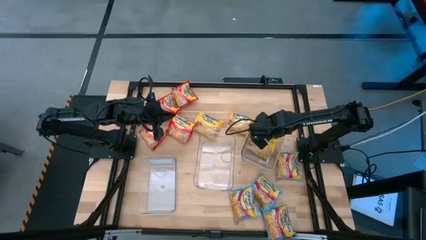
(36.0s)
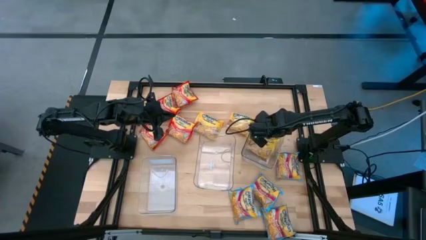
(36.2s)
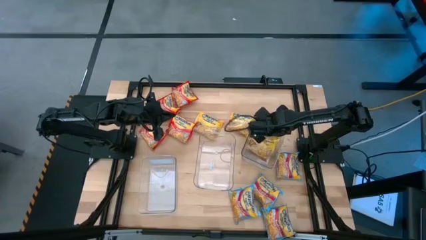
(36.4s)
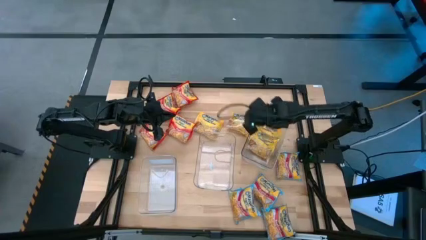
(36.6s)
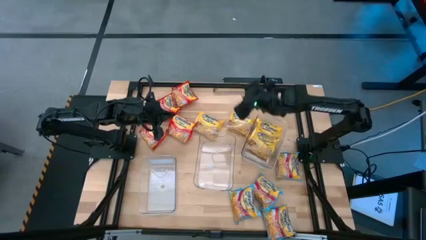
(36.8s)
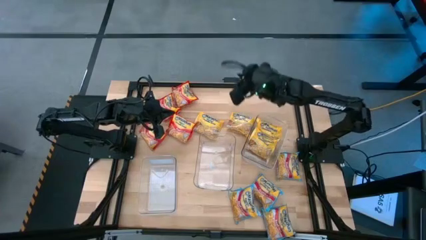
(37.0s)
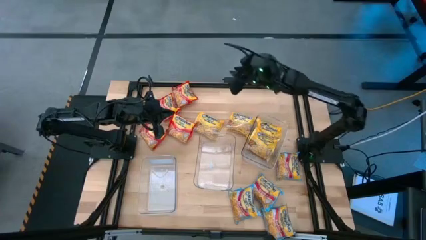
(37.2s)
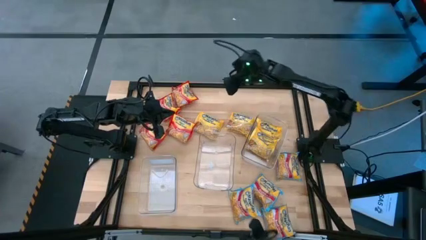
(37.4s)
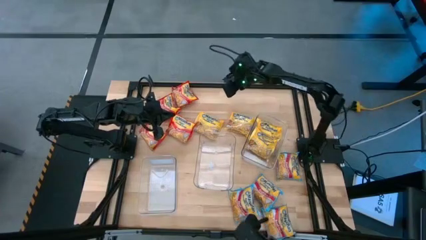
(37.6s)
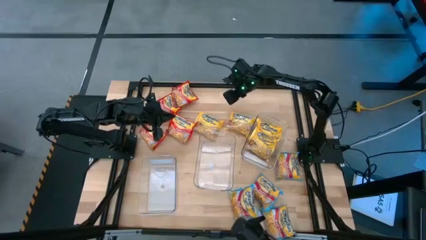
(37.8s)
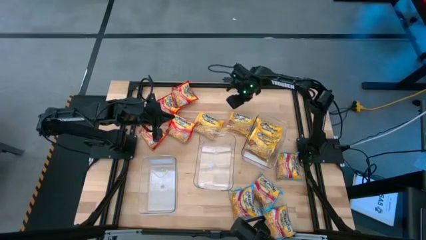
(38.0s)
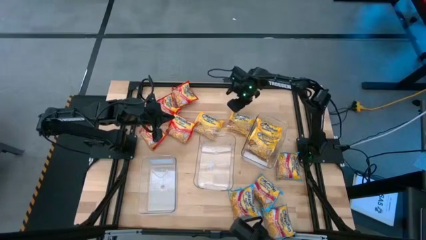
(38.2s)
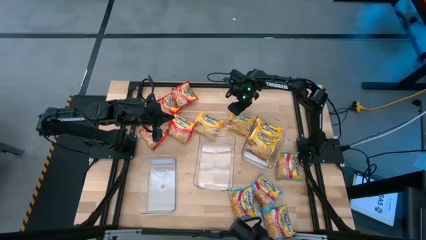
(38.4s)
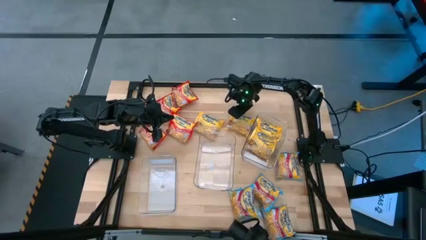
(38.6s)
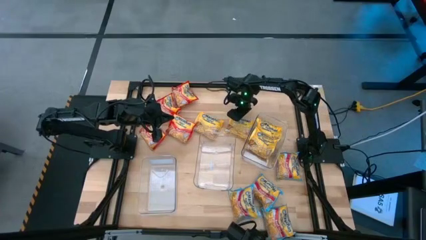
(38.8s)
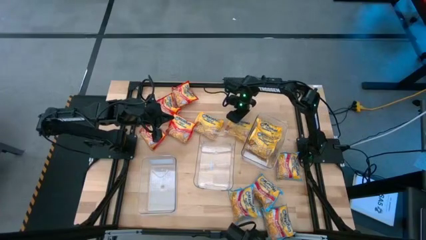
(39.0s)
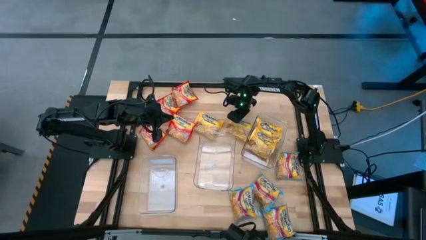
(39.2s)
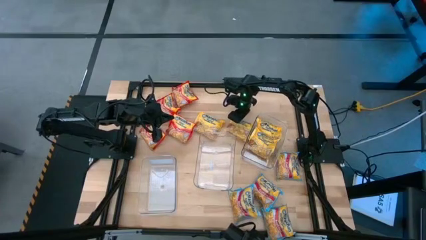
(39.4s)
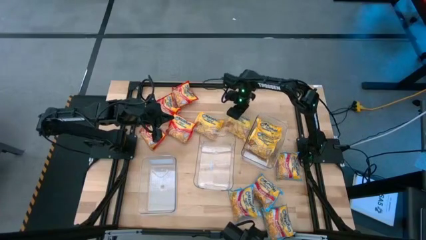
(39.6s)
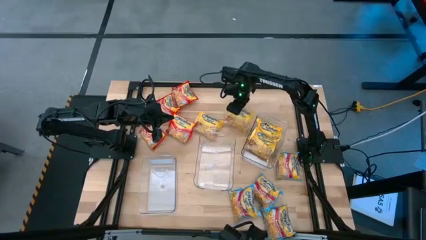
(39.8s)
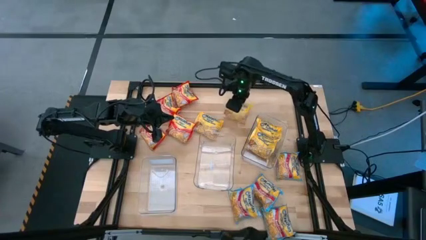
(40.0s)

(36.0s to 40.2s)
Task: Sort Maruchan noodles
Put the yellow noodle pack into the right transparent bin

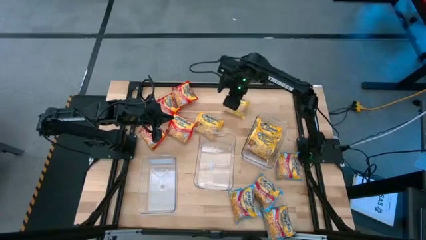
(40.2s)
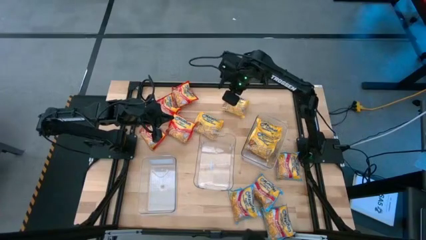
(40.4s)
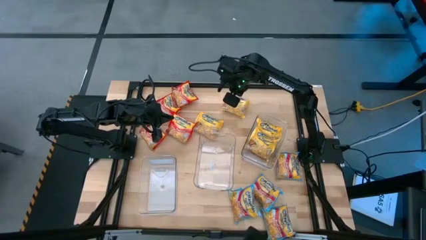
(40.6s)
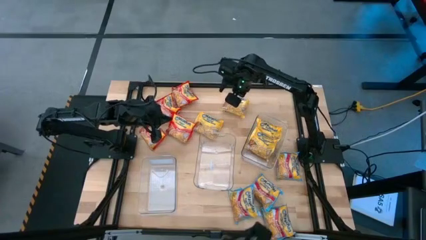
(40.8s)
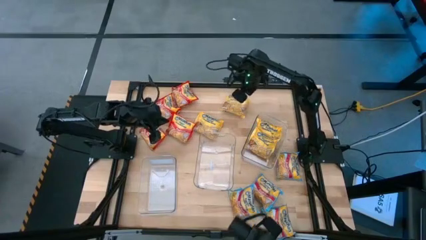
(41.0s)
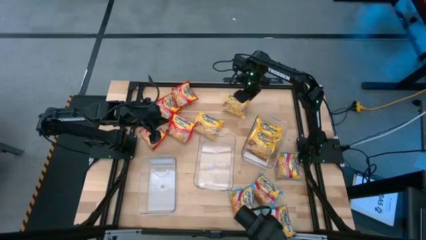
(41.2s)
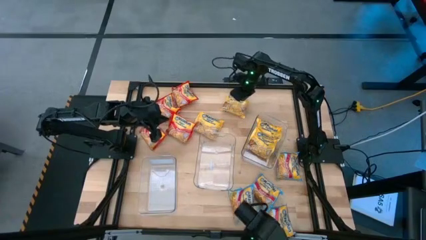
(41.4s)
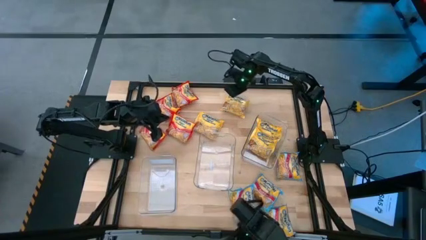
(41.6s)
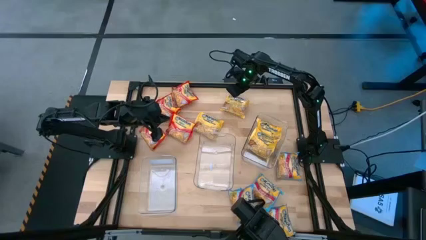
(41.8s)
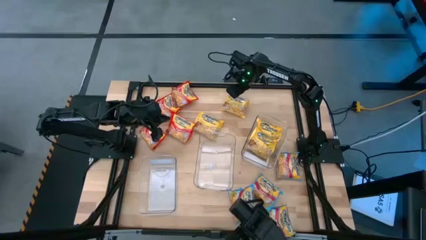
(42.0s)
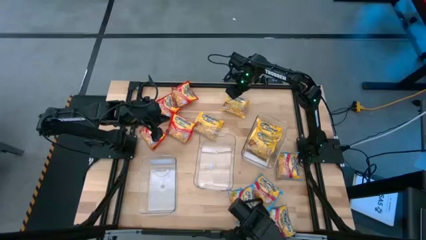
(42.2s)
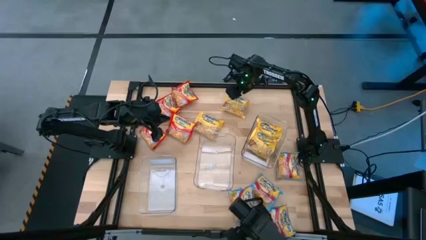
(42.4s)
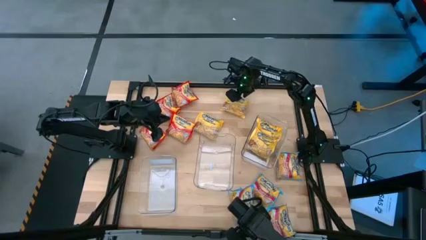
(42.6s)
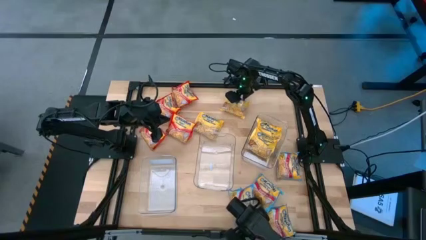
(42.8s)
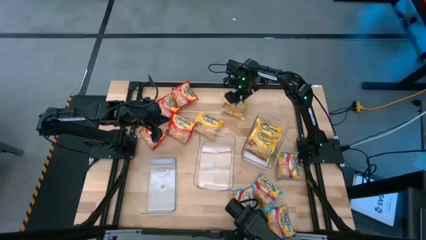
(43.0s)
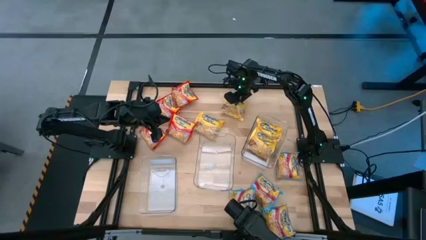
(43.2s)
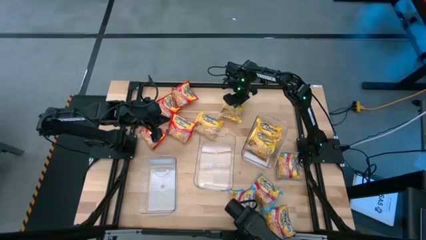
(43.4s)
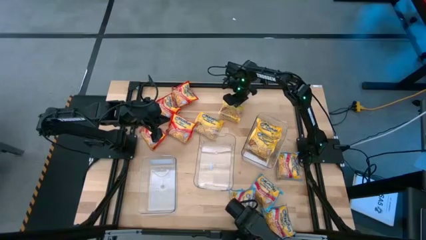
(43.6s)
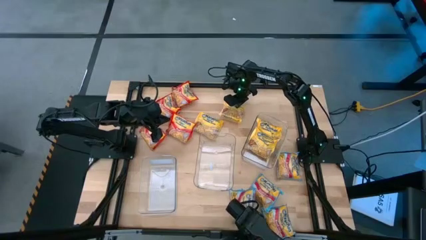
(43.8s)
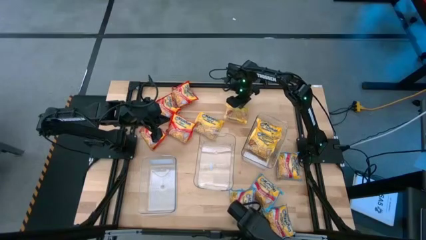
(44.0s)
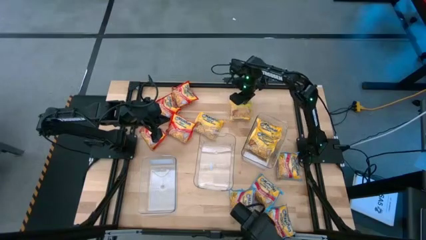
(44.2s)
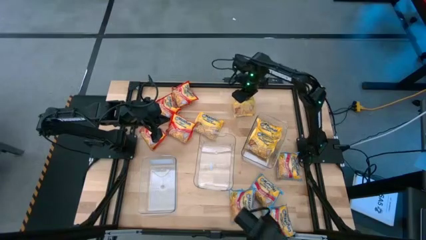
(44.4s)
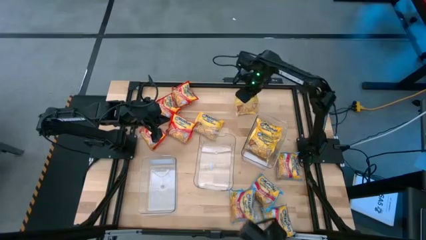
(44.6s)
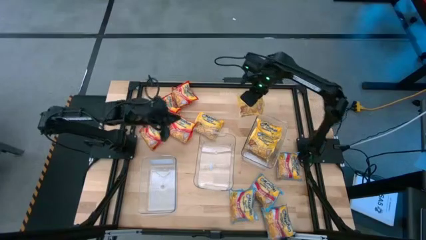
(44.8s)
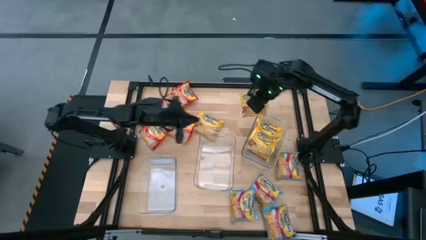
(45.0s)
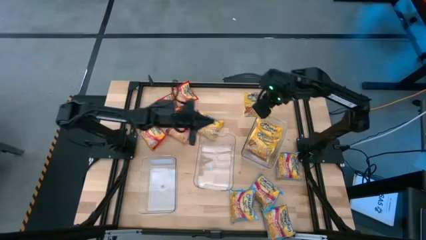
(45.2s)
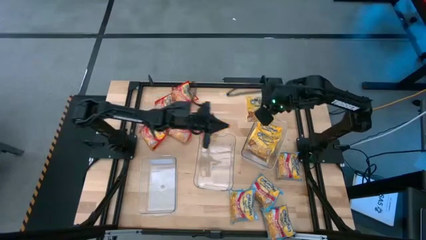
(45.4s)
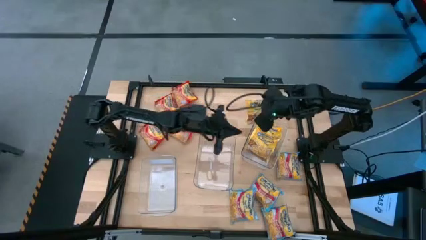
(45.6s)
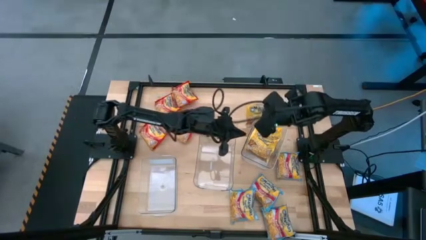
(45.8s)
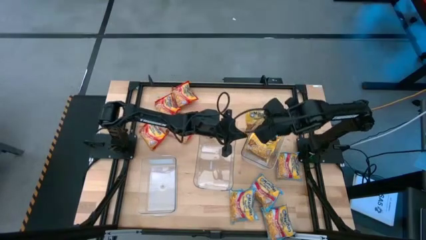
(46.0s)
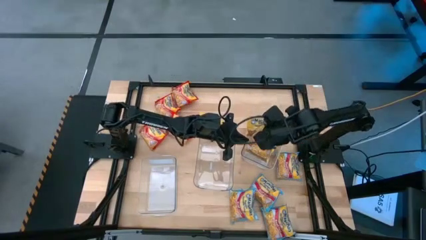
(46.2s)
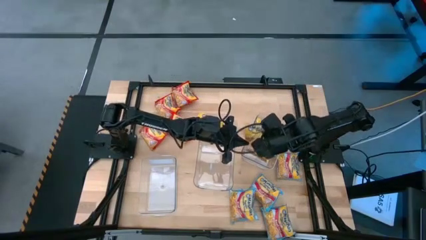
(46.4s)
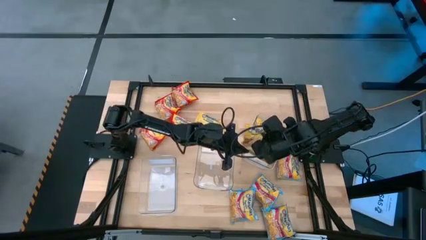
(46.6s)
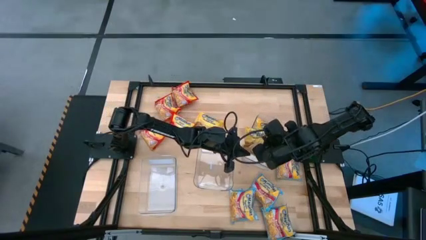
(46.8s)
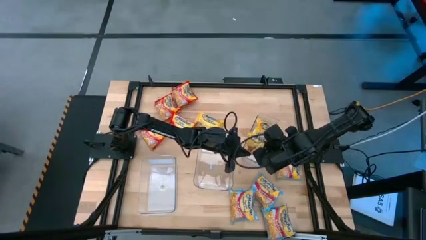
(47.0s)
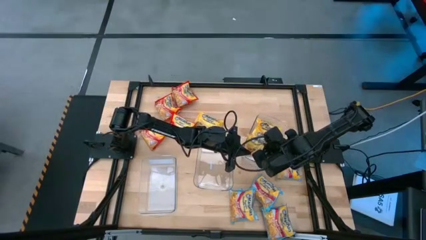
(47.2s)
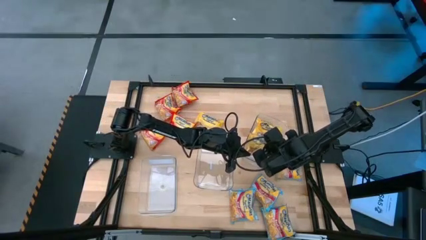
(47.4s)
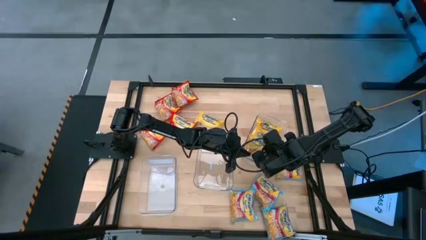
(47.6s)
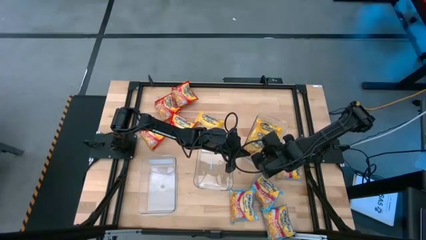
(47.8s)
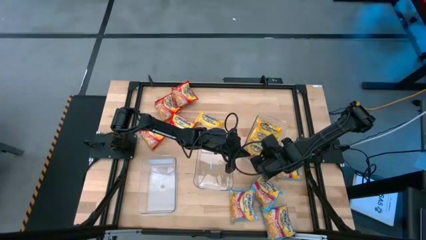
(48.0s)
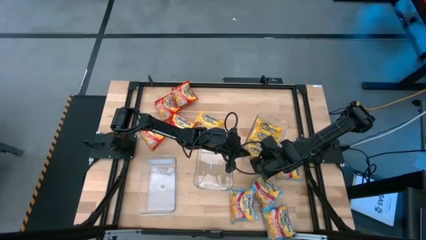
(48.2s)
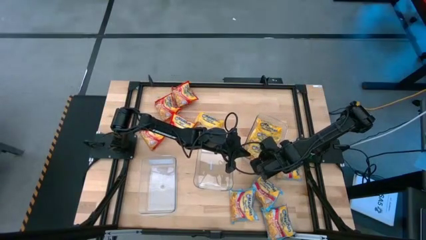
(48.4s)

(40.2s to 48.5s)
Put the yellow noodle pack into the right transparent bin

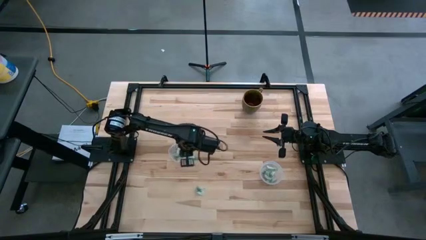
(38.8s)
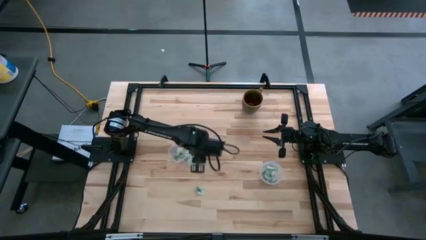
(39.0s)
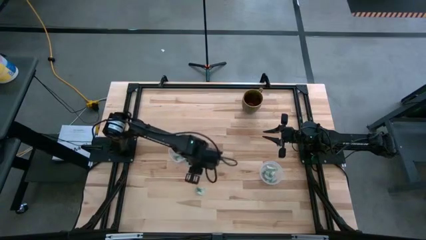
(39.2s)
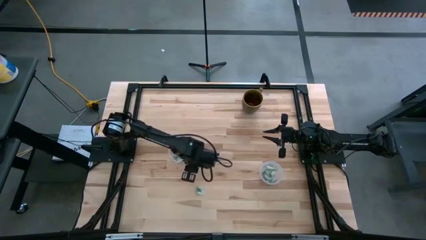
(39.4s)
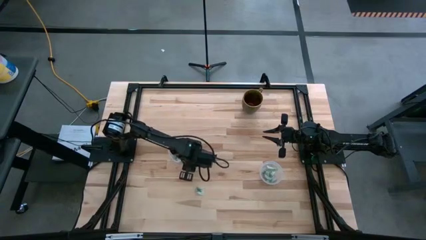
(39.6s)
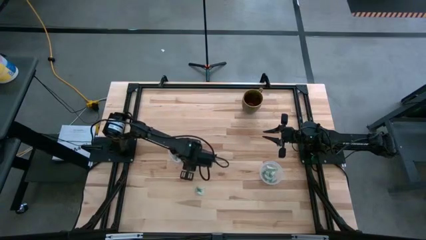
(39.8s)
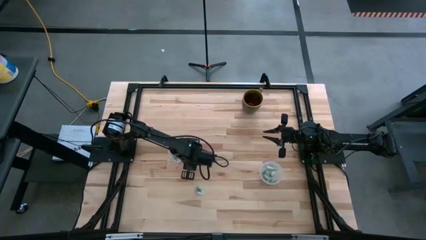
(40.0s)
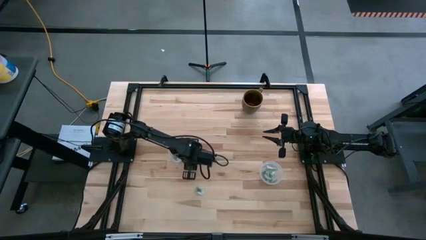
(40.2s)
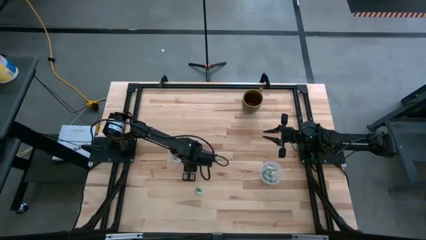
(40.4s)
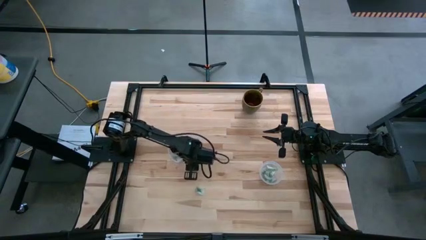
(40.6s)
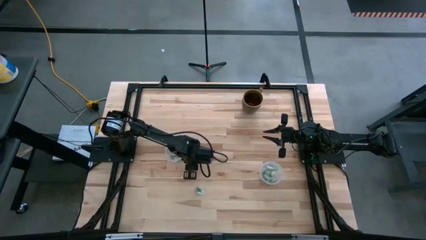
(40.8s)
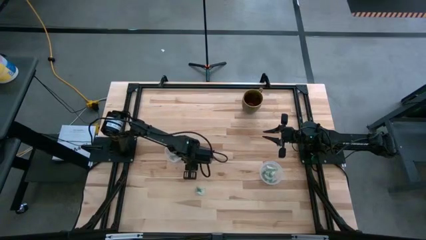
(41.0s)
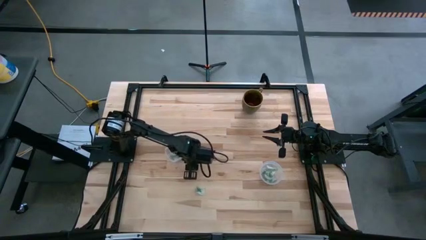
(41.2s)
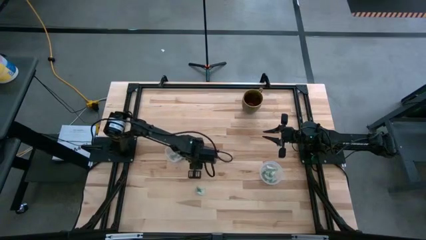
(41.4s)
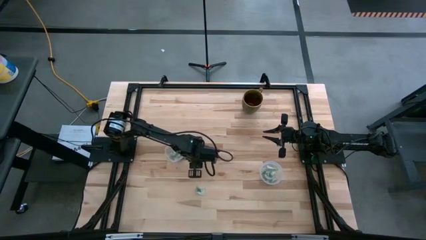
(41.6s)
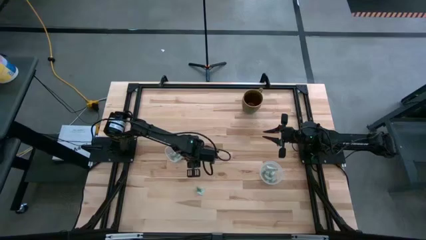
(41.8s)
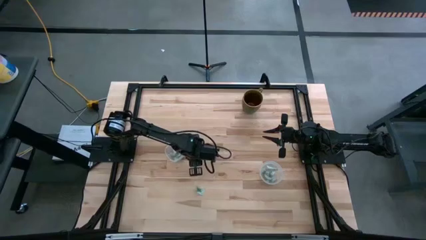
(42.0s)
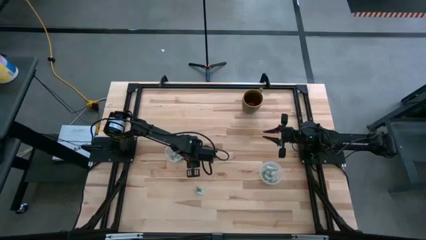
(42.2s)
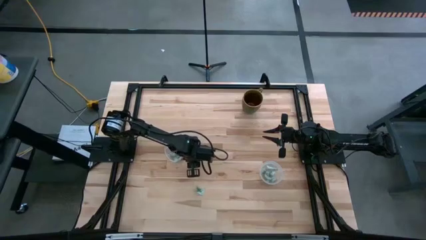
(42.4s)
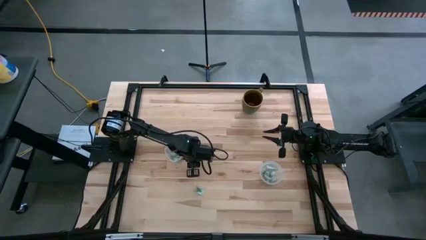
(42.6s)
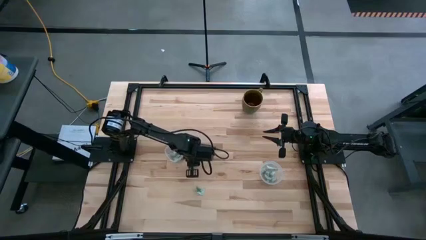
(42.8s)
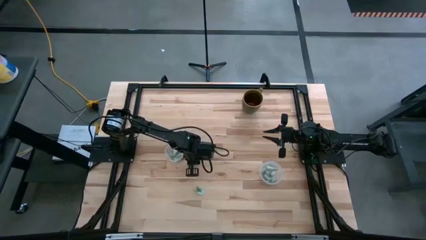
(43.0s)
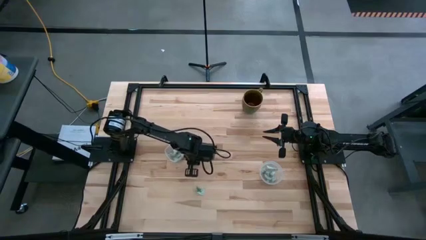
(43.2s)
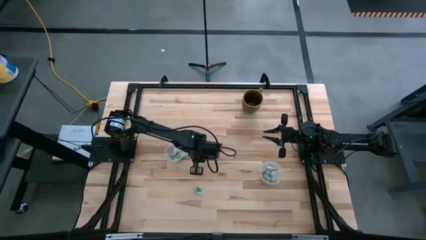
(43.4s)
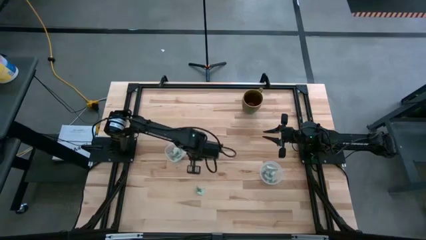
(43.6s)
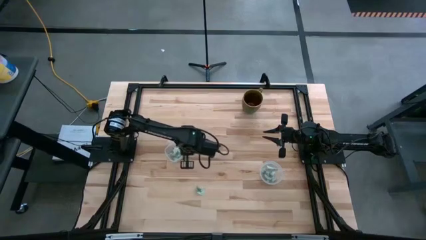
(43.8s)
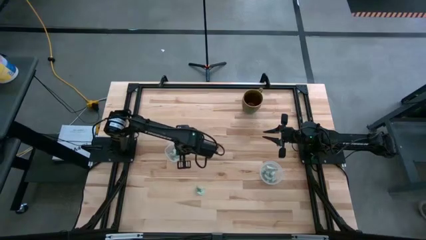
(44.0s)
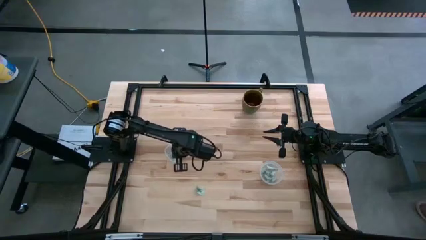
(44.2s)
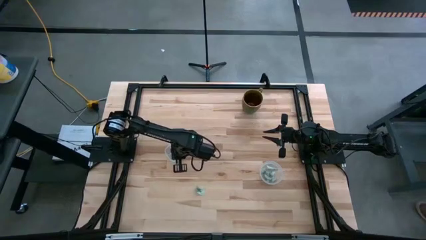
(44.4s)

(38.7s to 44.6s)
Task: Pick and place Stevia / Truvia into bins
Put the stevia packet into the square transparent container
